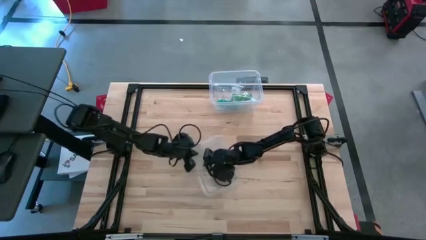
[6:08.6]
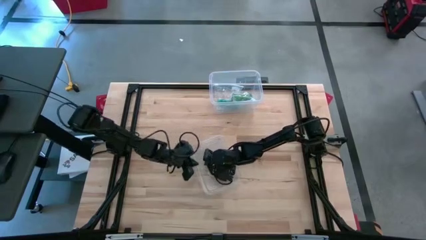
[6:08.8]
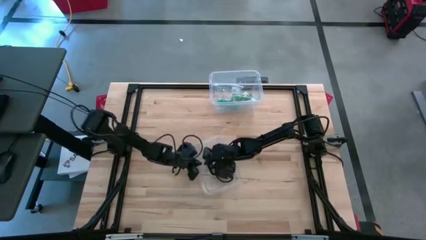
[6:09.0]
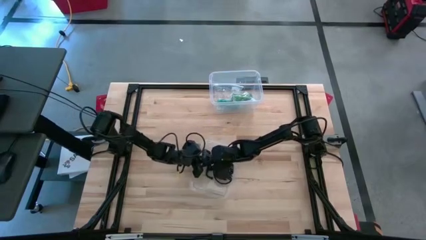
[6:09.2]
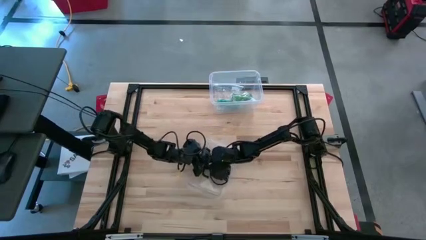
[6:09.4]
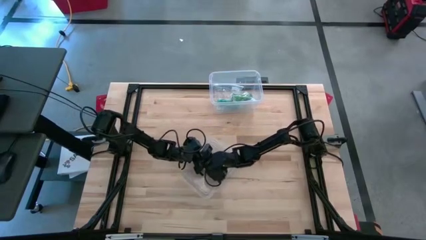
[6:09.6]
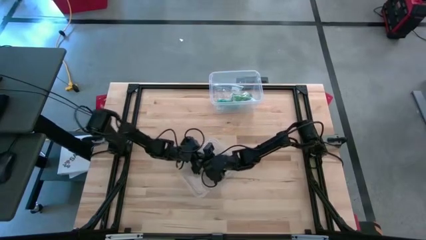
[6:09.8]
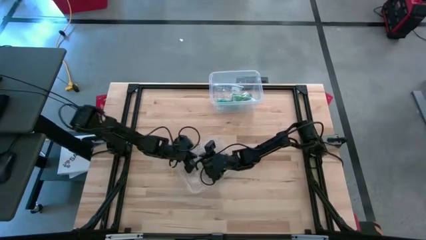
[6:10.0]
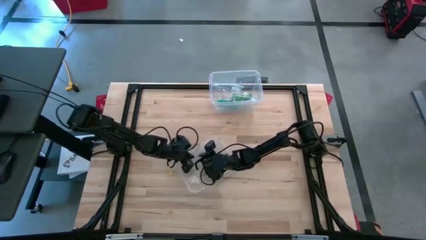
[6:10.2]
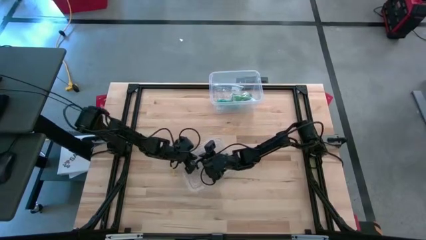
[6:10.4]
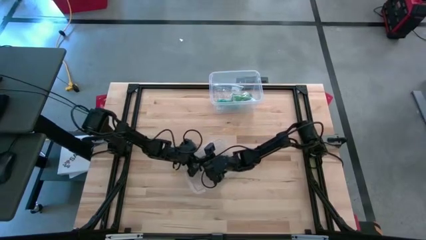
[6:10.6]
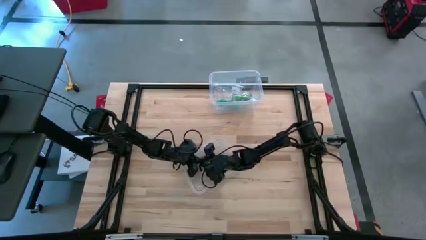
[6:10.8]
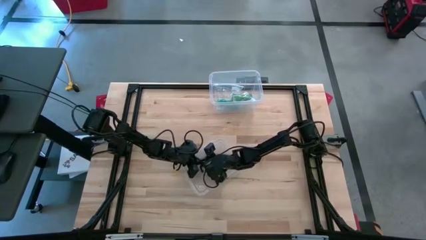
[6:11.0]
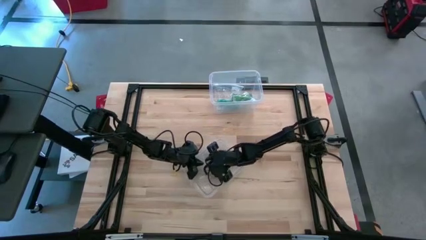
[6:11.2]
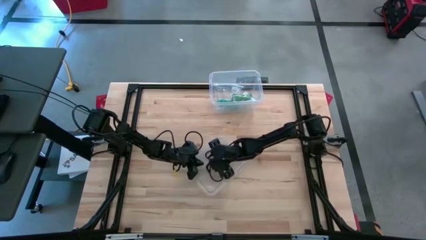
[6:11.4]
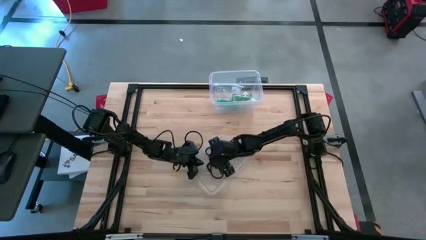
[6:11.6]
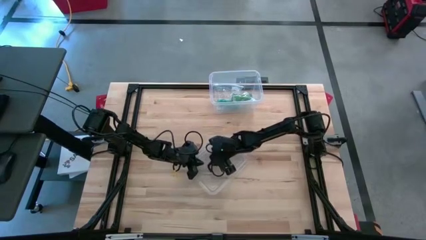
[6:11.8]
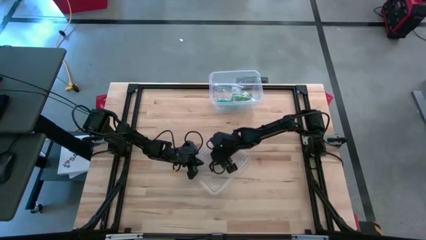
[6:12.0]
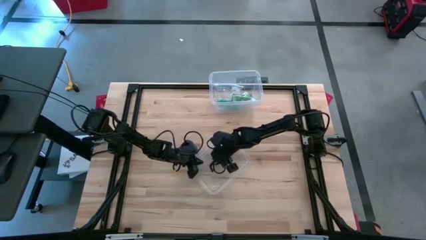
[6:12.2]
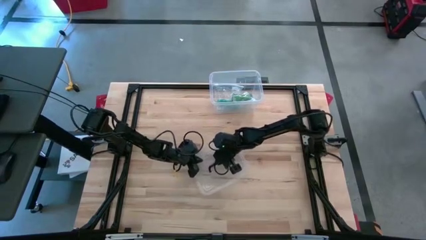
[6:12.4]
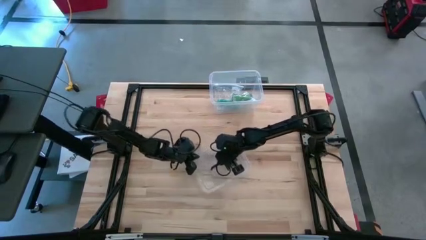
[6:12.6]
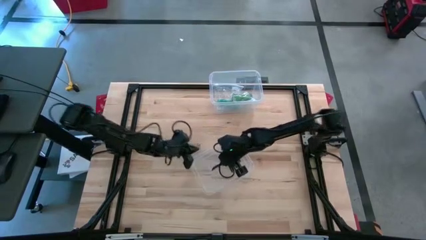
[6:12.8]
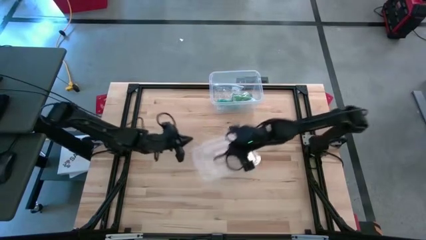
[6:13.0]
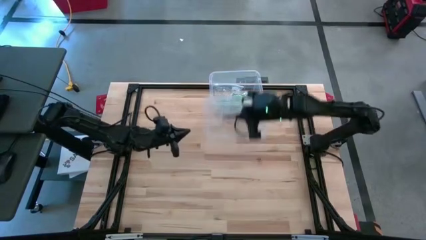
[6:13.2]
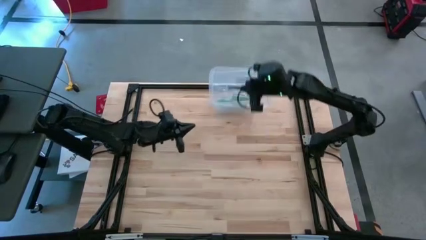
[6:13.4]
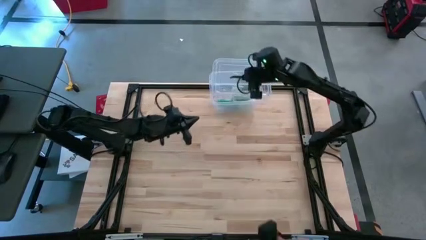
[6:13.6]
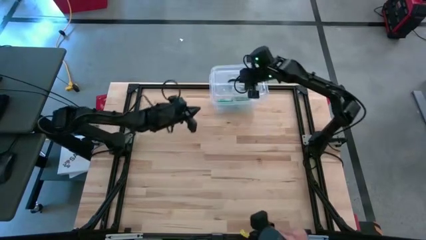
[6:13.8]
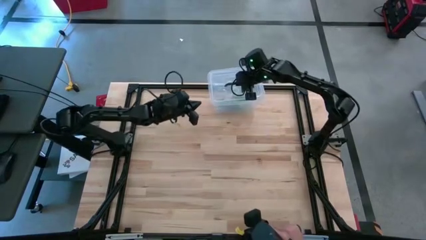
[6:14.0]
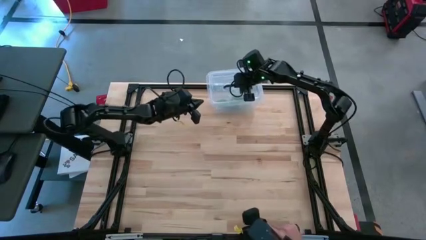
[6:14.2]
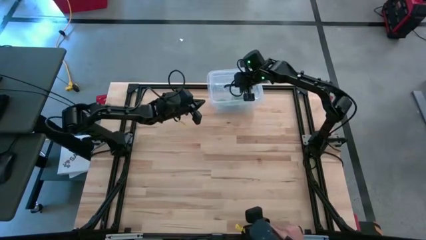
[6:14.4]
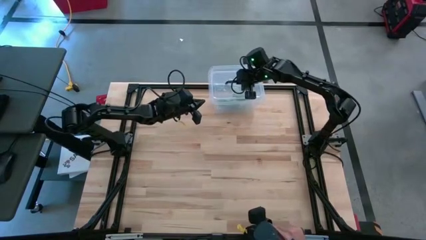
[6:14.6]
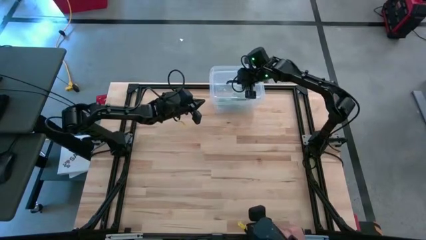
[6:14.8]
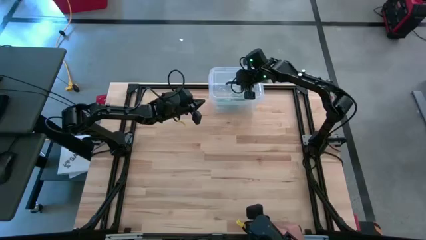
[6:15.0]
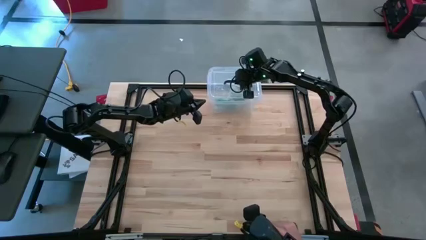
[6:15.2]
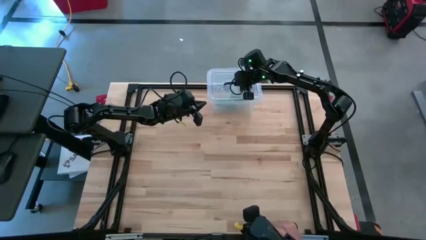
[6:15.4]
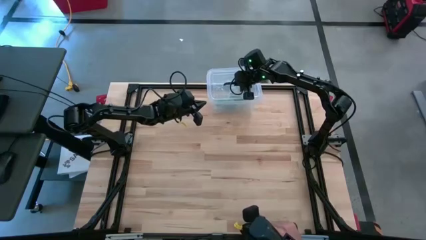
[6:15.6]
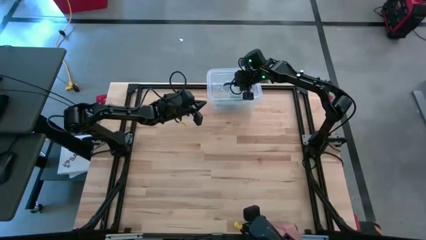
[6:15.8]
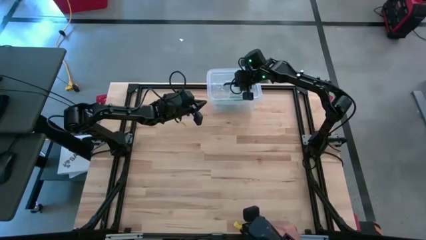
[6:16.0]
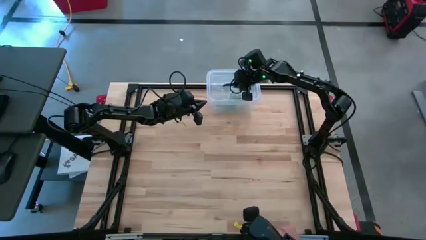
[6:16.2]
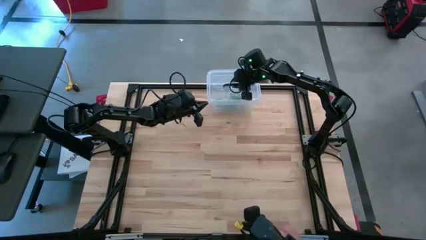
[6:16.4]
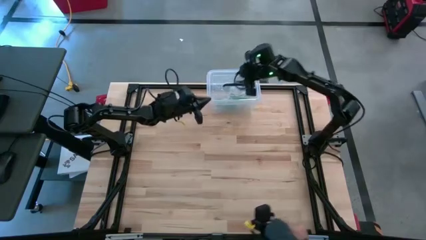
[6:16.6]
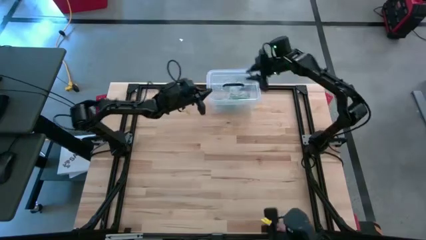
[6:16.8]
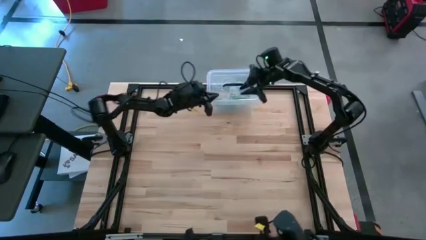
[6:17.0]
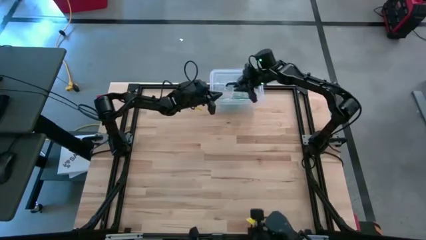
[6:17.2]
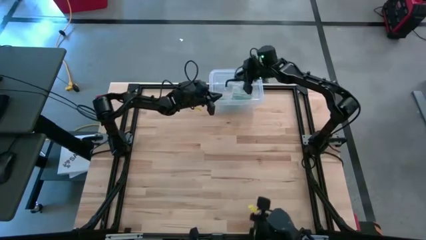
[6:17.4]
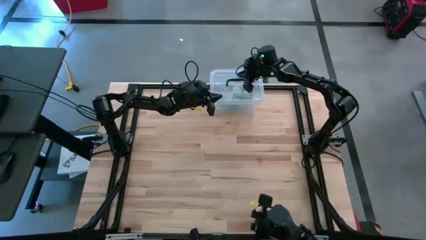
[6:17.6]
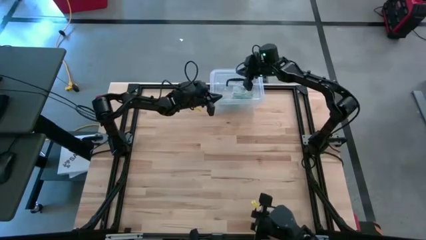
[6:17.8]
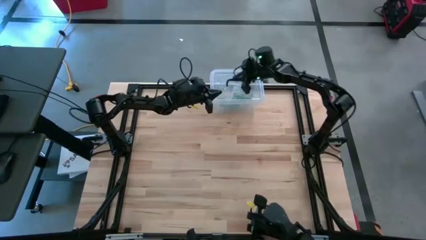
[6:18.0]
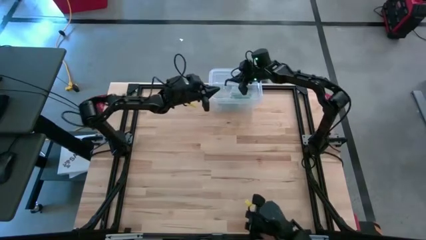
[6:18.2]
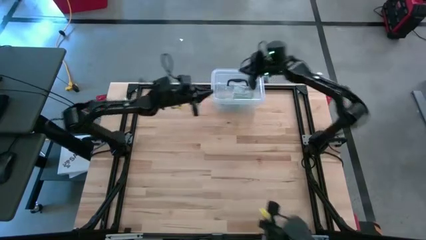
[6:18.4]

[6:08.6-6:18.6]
Task: Roll bandage
Close the transparent container

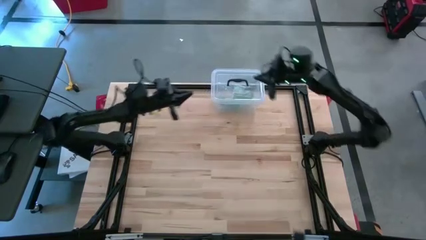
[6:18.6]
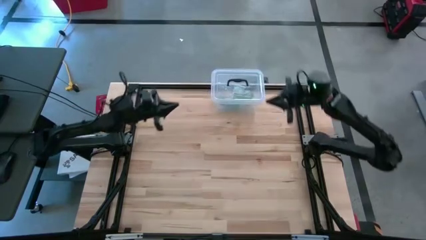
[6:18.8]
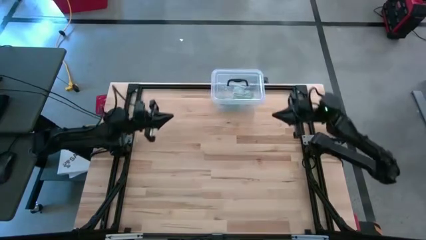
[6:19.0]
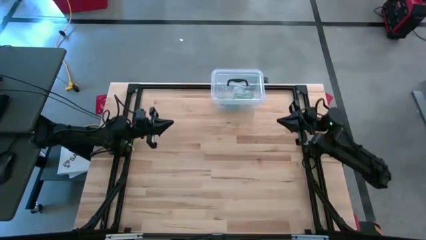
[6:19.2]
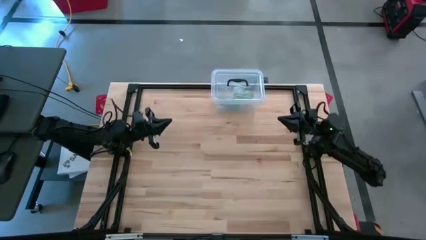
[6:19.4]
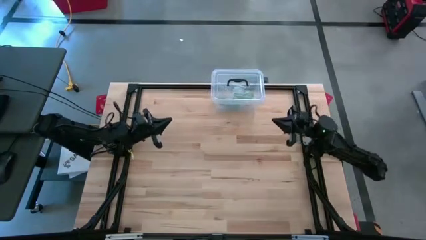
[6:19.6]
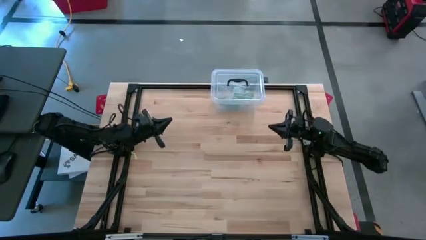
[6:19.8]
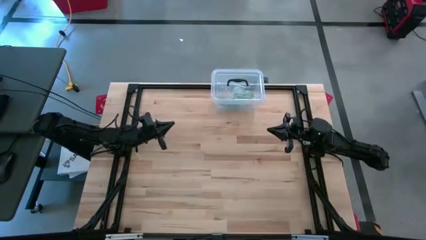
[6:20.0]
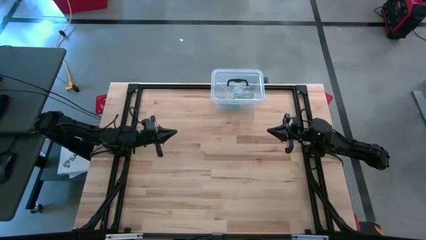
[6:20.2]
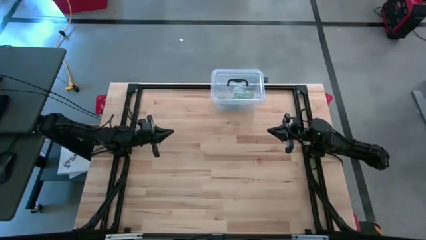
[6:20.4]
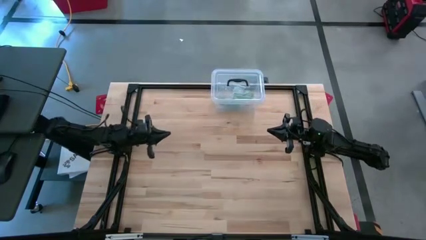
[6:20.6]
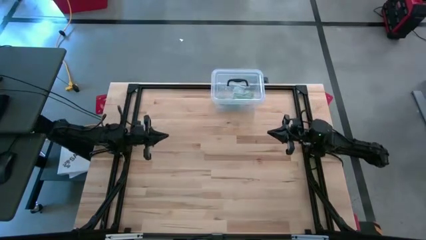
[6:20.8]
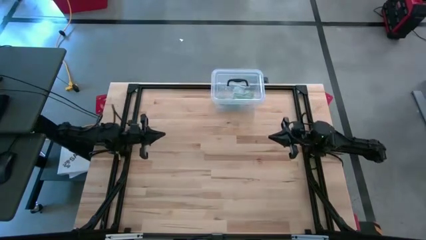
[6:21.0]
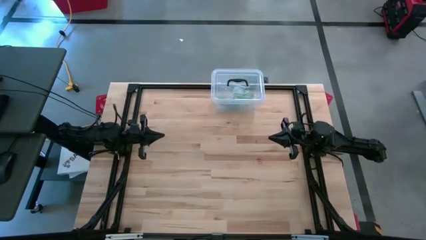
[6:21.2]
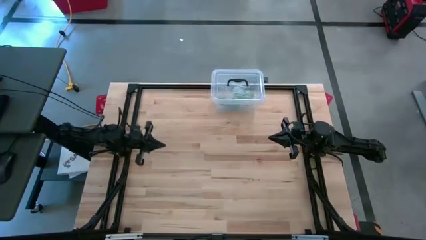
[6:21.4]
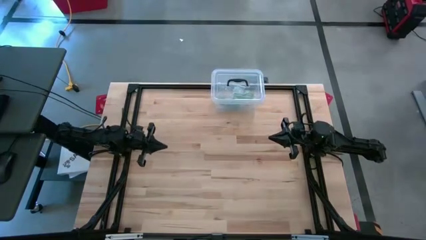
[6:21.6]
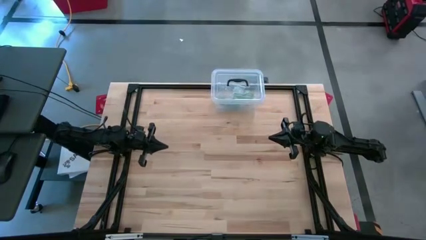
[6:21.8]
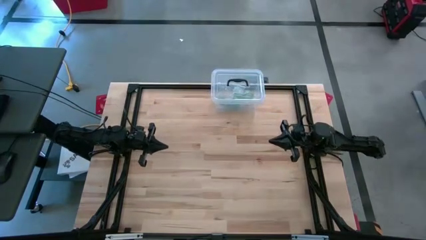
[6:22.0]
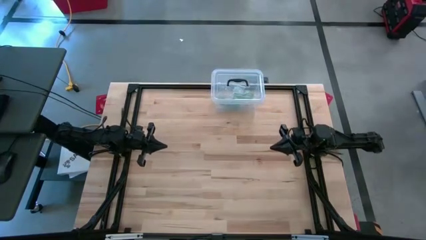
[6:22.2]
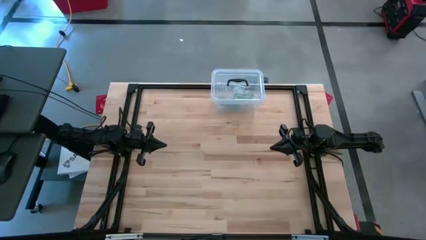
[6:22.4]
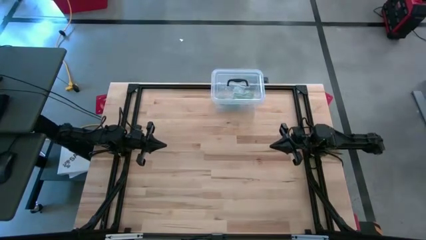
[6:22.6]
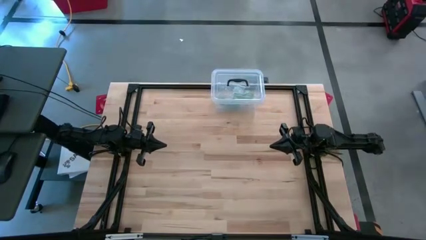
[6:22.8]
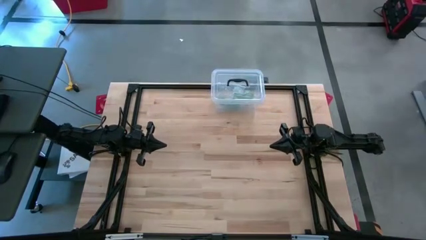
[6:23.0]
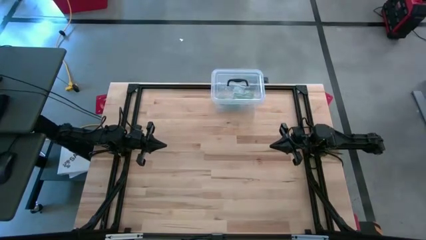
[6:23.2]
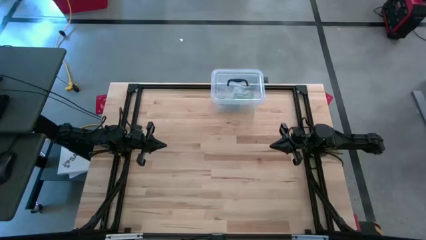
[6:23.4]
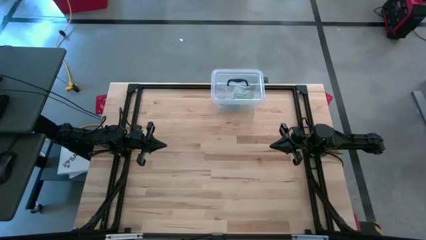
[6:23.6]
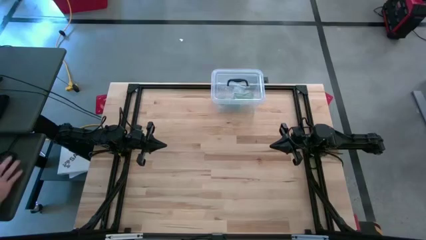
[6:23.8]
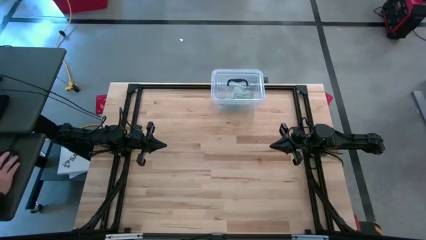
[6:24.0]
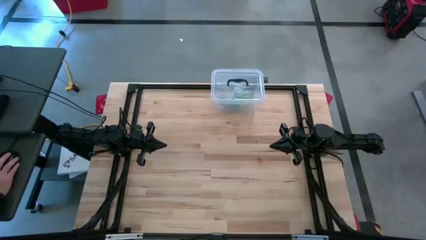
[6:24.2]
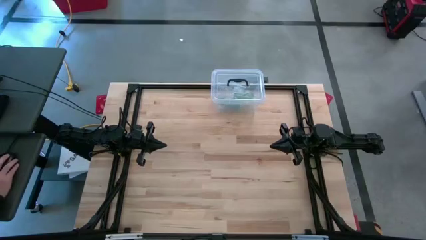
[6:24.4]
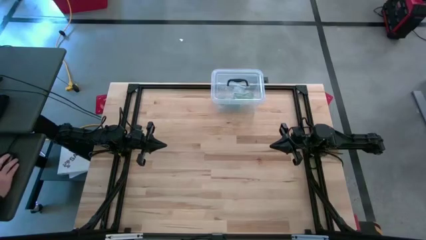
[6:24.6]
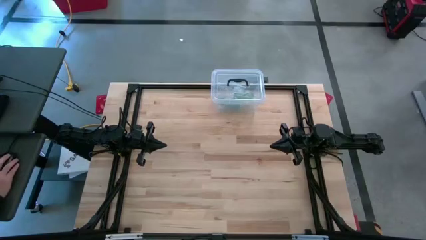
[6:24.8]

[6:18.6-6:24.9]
Return to Home Position
